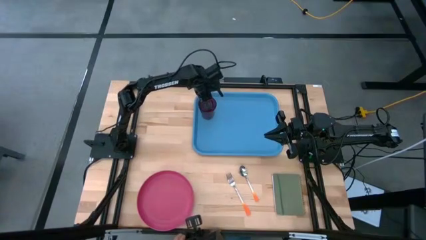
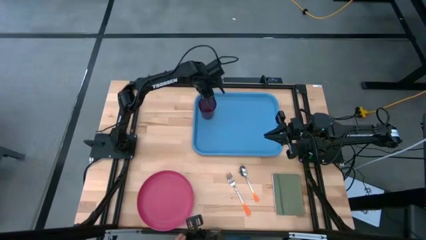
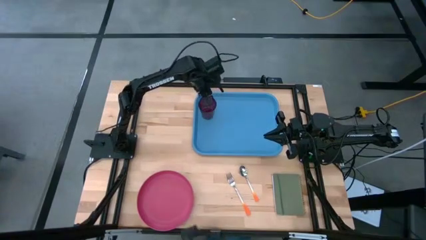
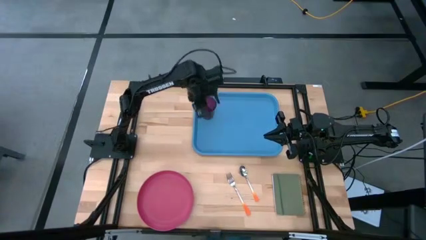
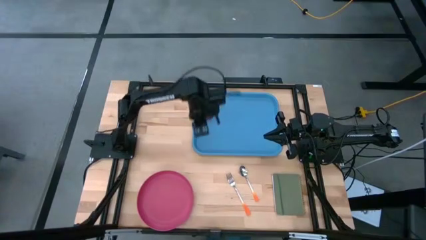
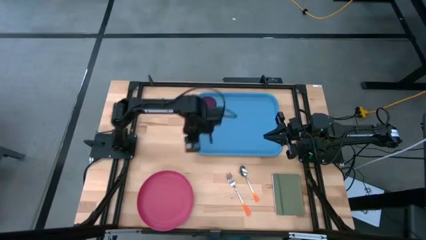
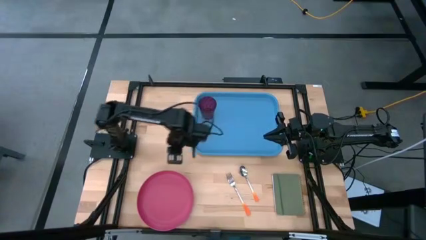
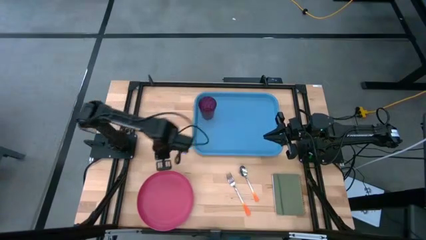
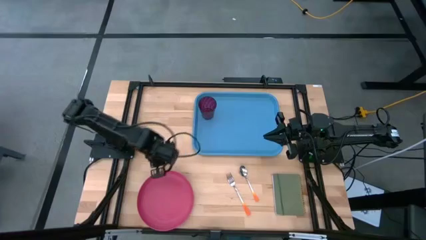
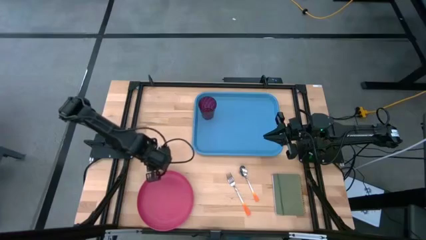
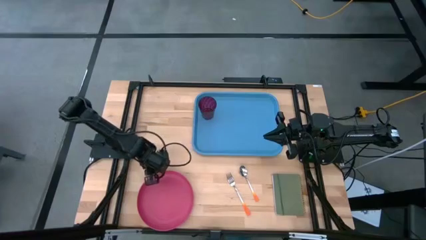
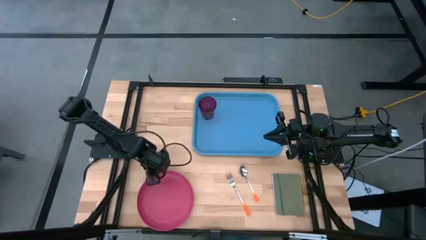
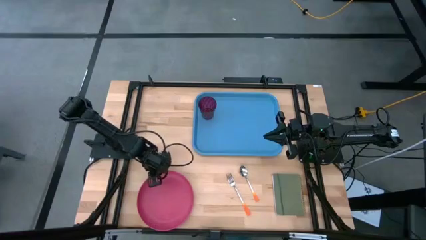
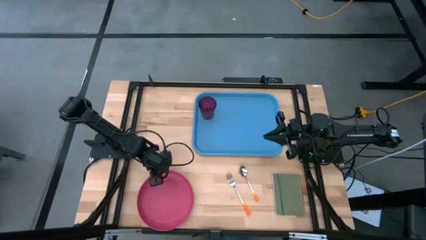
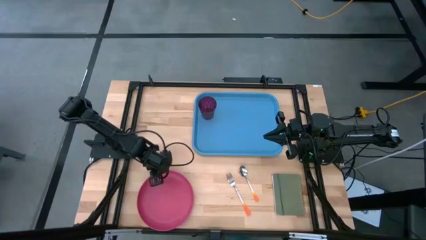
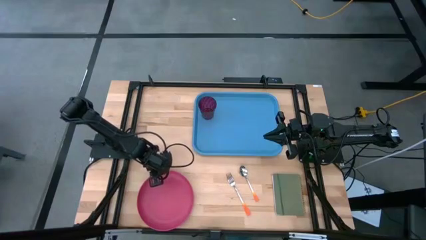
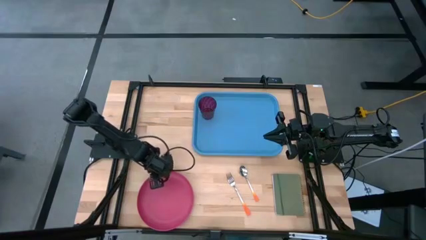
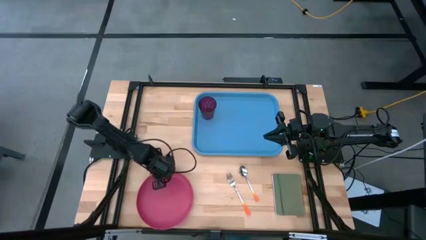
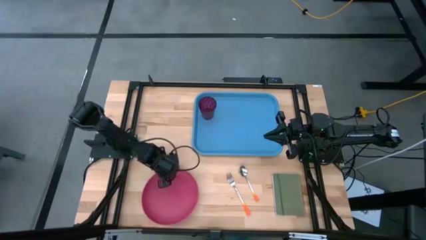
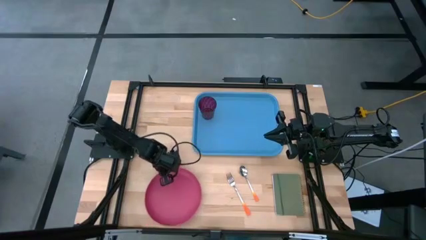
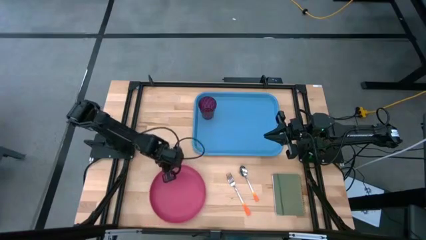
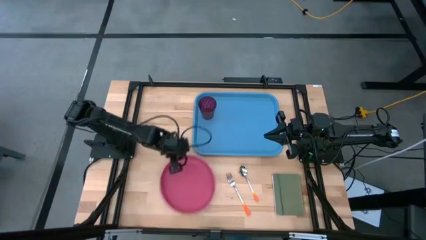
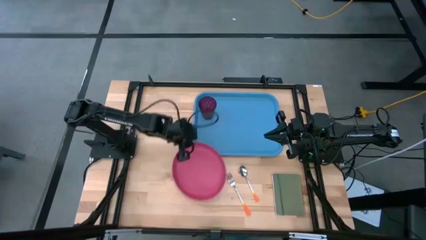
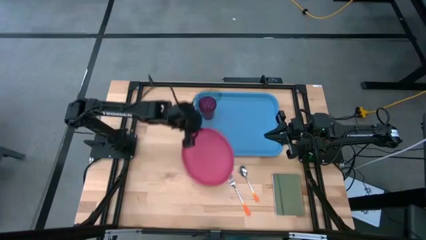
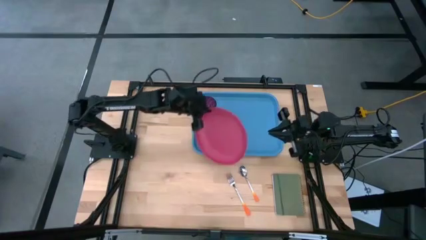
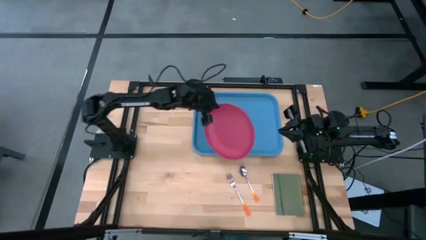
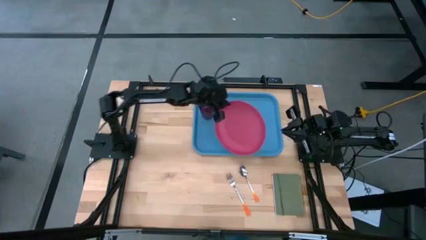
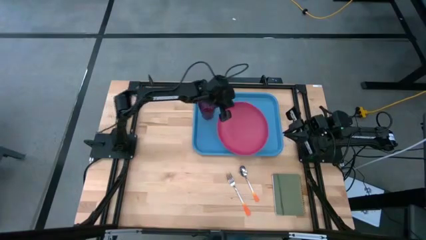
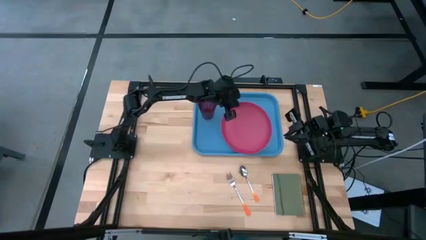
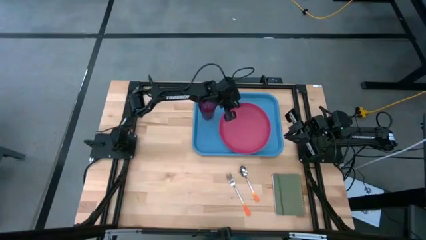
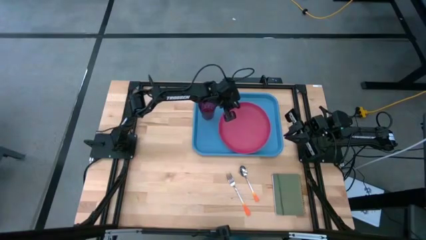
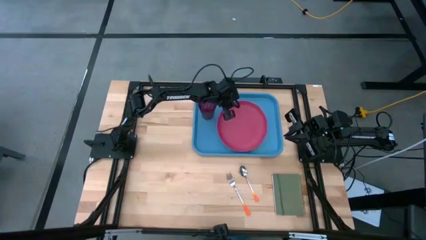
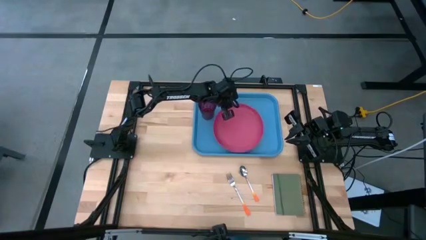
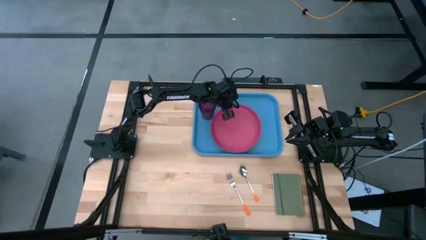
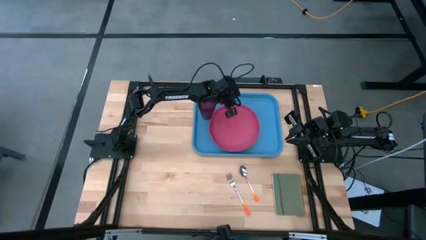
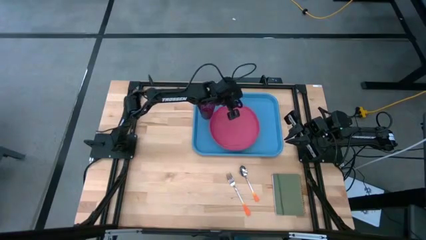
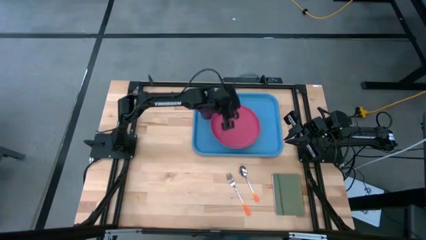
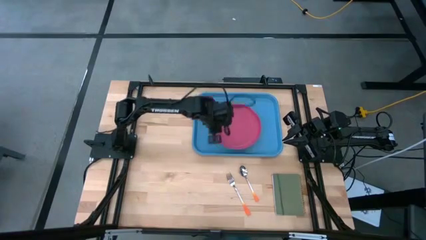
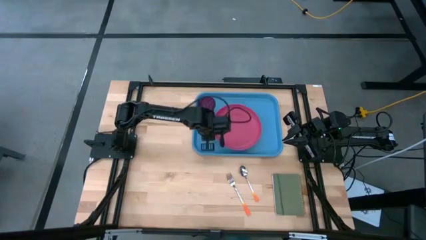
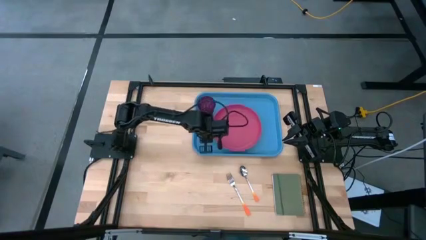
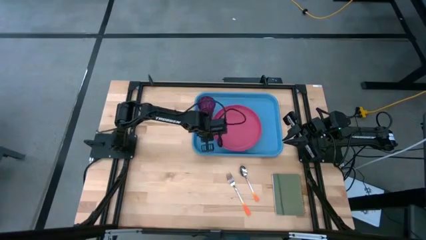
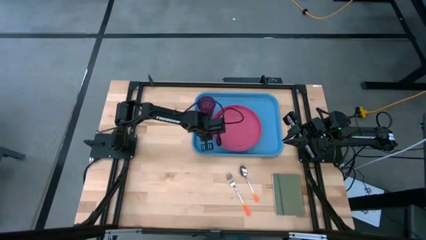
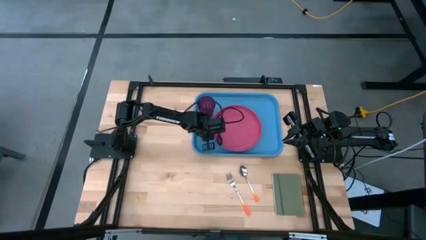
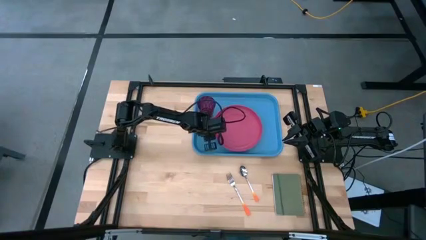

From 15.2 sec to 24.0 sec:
Task: Pick and place plate/cup/fork/spoon on tray
Put the pink plate beside the red cup on the blue tray

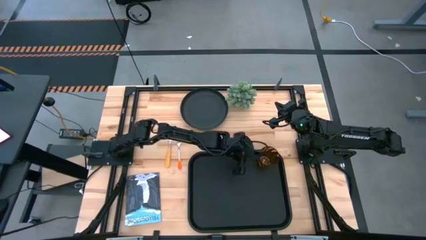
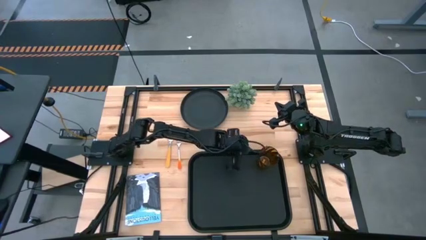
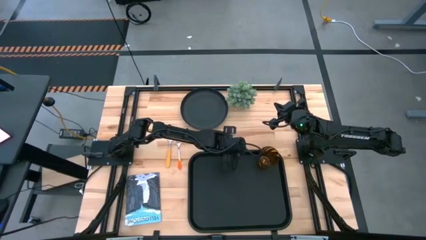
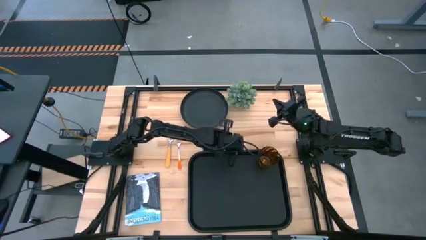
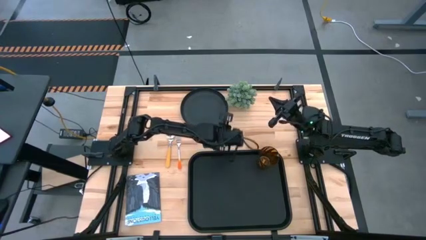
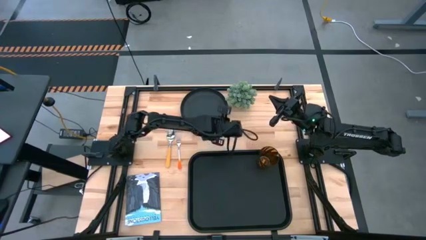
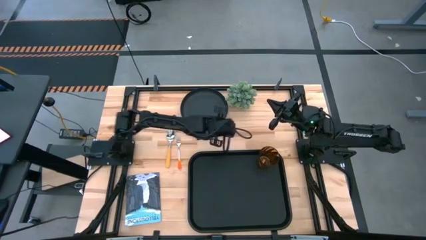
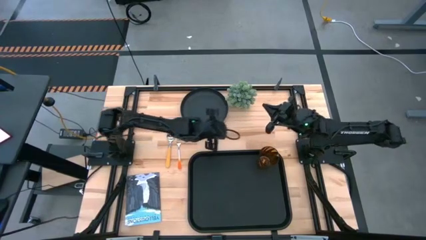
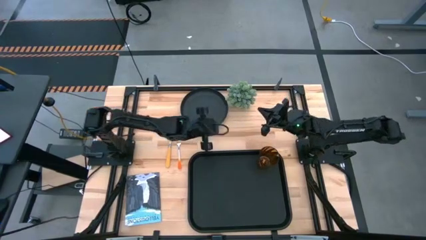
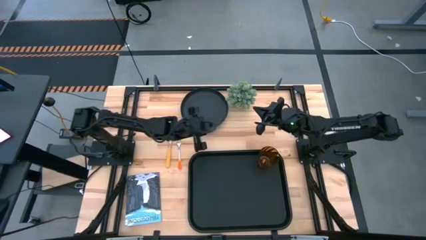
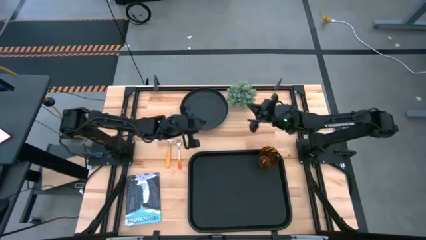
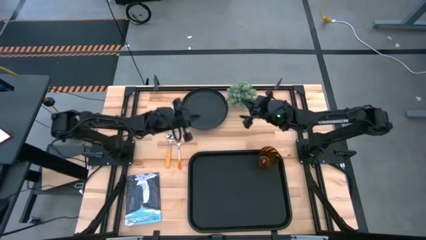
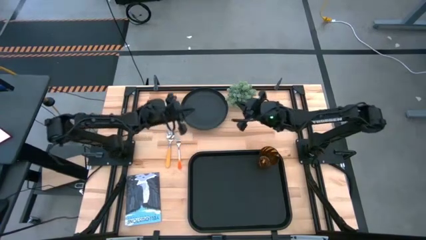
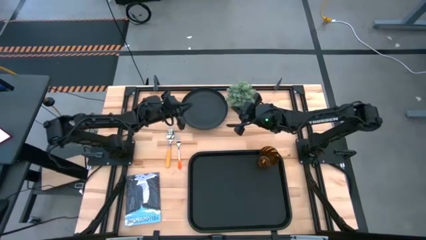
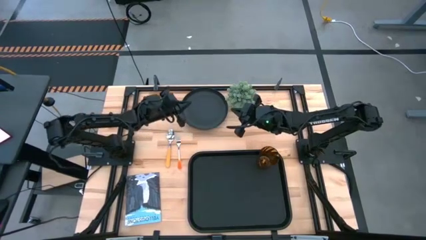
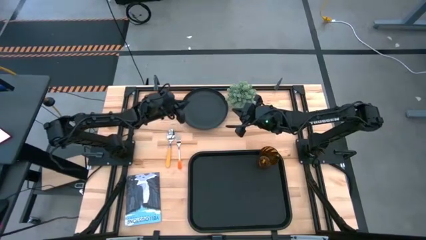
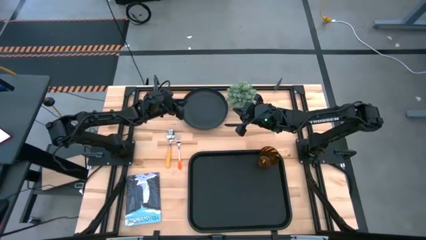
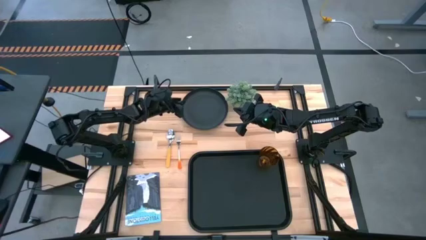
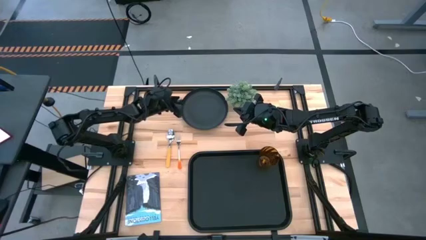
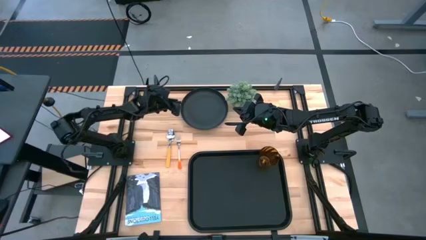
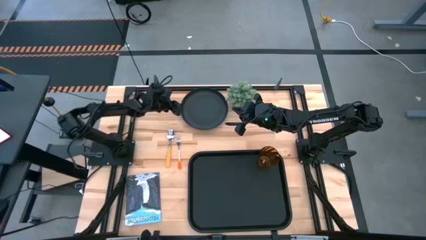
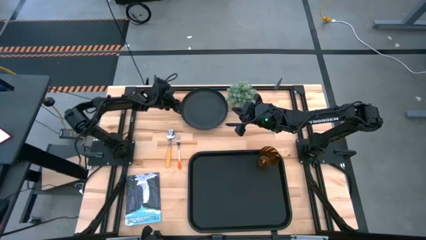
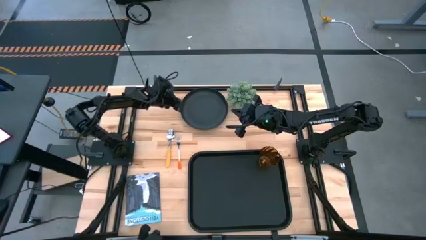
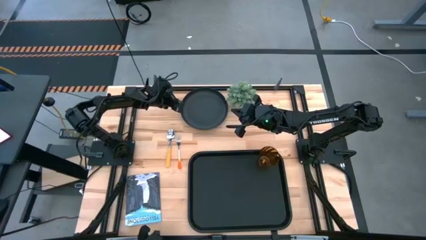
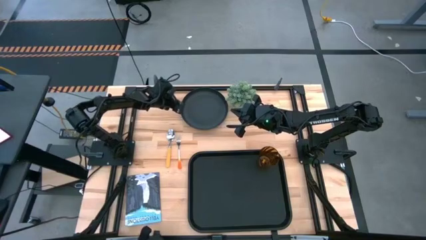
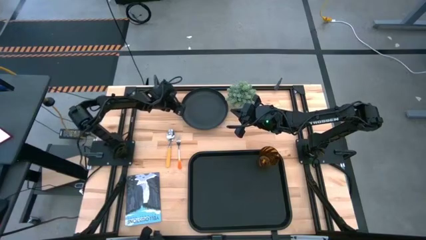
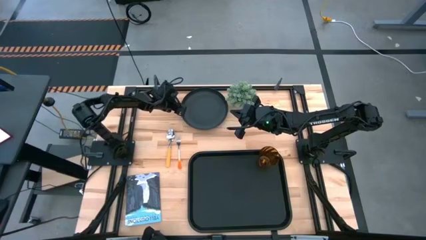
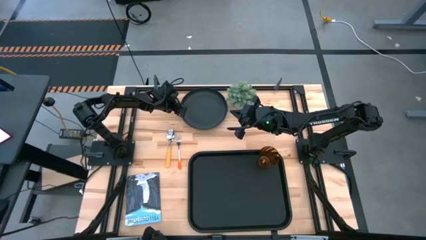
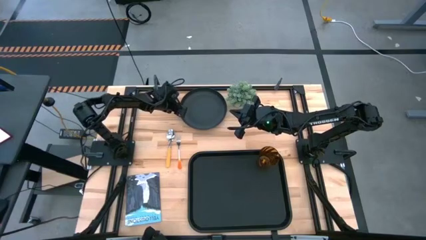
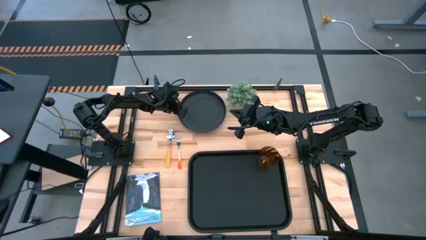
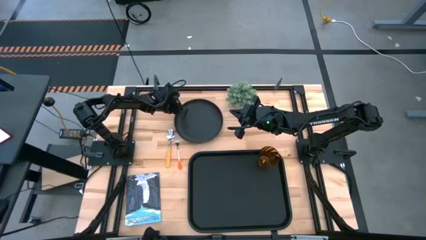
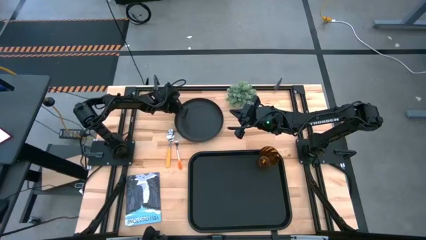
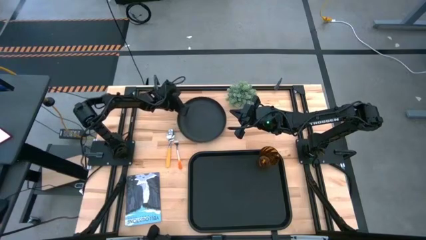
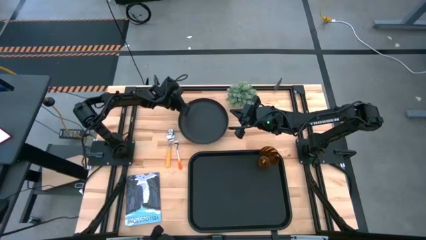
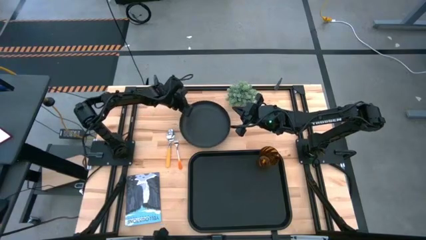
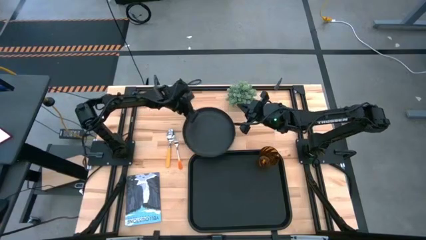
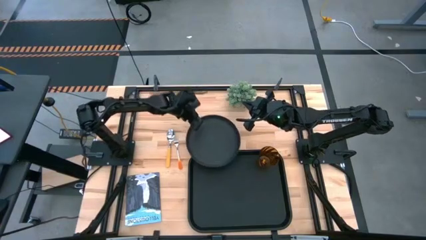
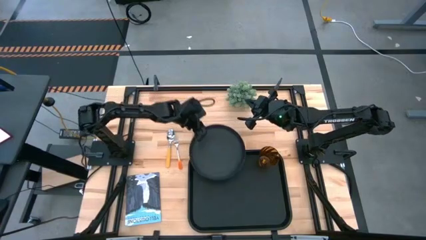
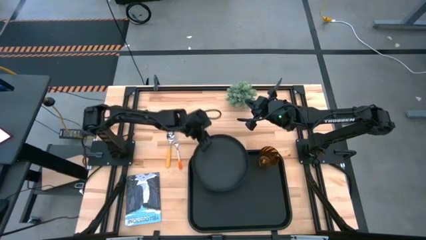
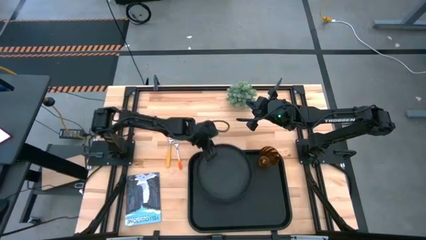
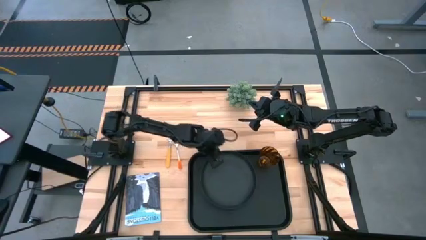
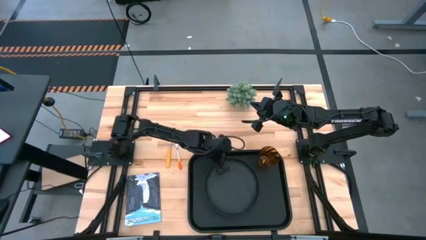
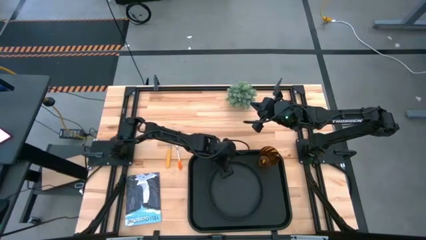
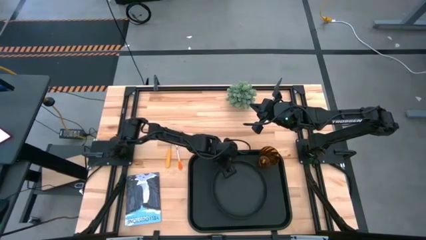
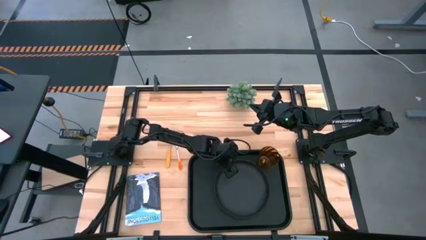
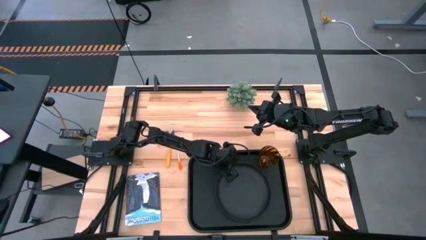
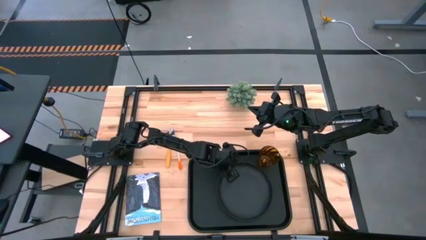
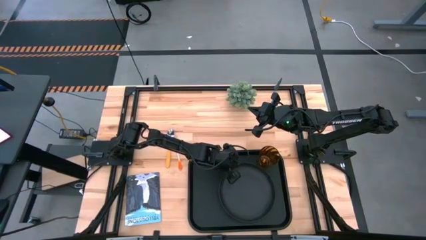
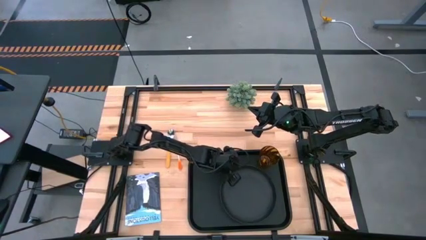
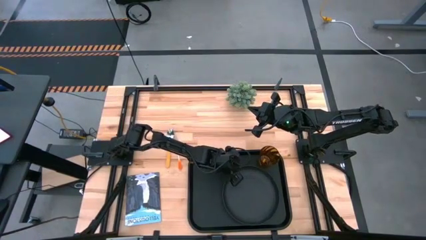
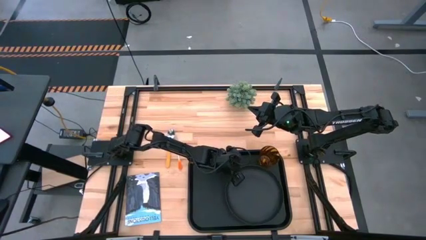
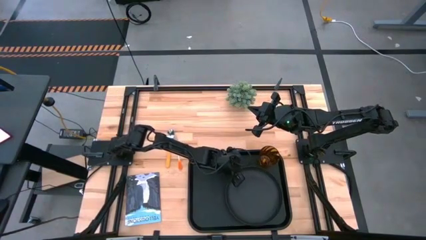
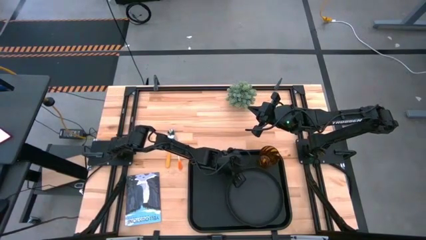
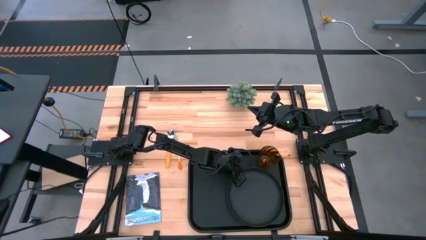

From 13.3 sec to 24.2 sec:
Task: Pick and place plate/cup/fork/spoon on tray
Put the black plate on the black serving tray at the bottom left of the orange glass
